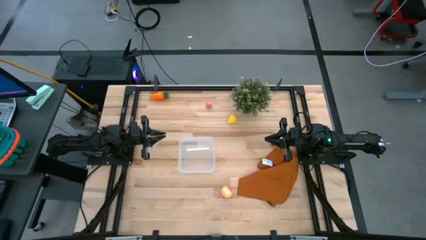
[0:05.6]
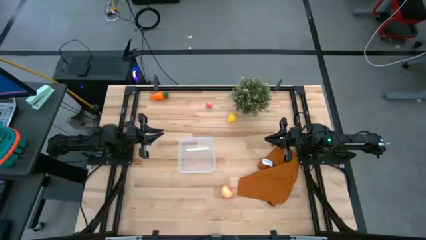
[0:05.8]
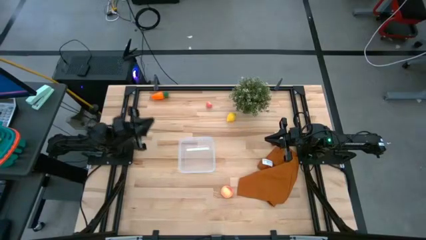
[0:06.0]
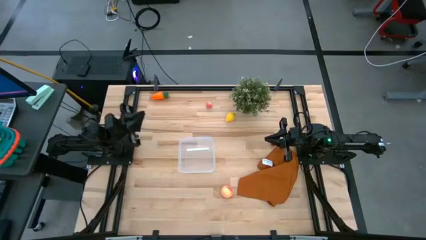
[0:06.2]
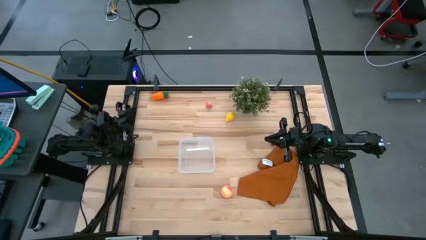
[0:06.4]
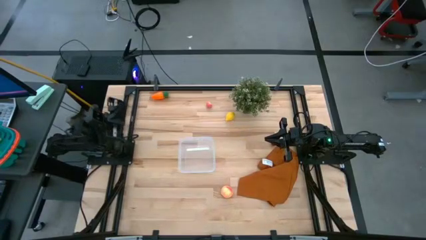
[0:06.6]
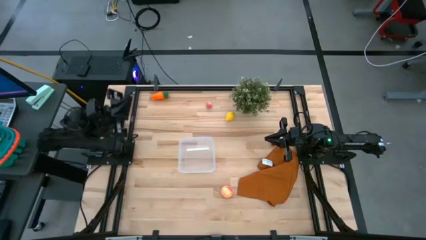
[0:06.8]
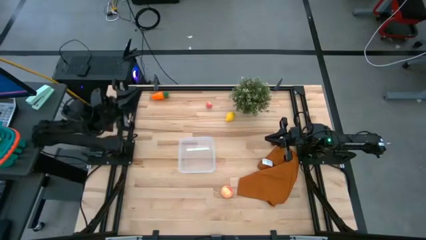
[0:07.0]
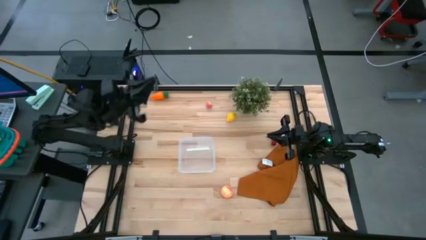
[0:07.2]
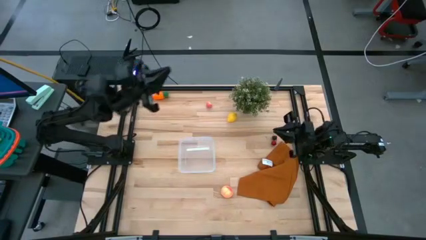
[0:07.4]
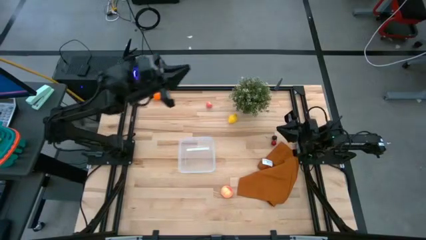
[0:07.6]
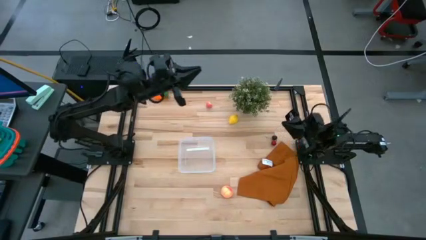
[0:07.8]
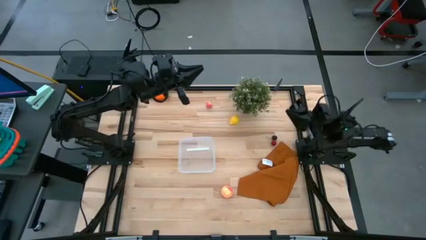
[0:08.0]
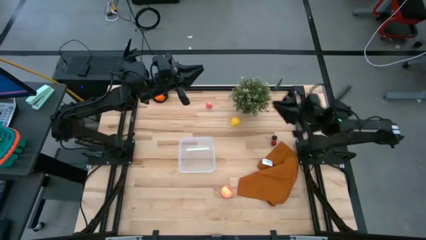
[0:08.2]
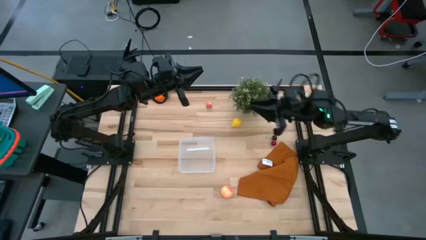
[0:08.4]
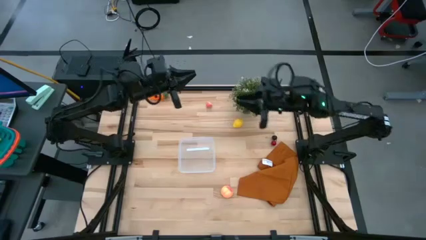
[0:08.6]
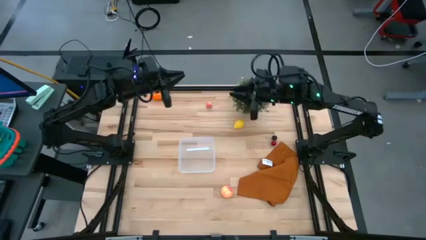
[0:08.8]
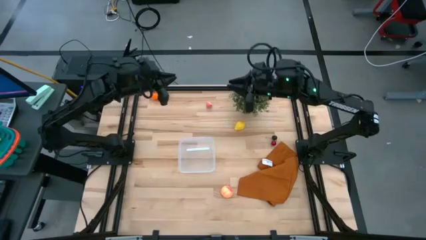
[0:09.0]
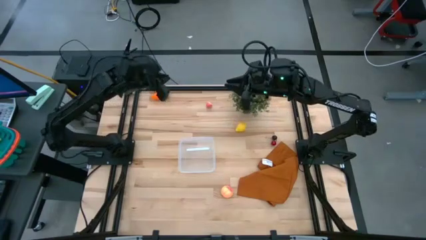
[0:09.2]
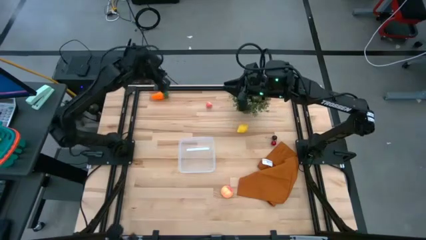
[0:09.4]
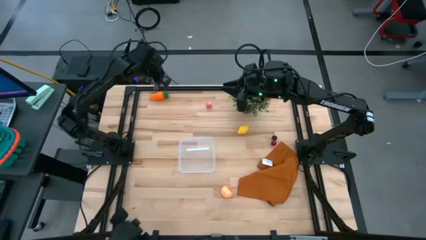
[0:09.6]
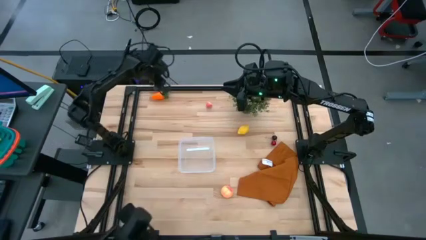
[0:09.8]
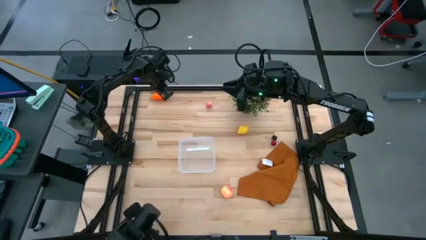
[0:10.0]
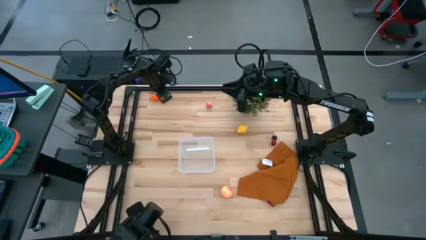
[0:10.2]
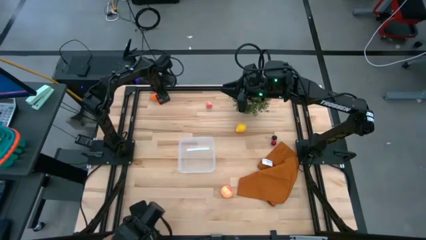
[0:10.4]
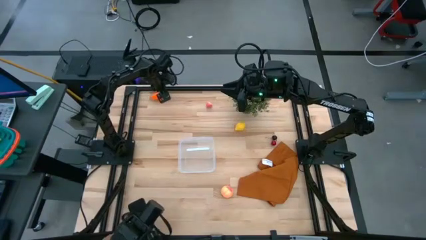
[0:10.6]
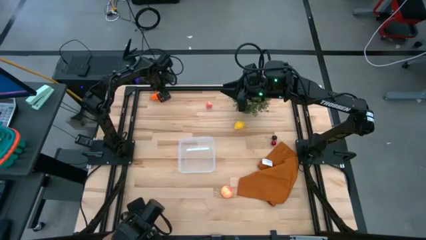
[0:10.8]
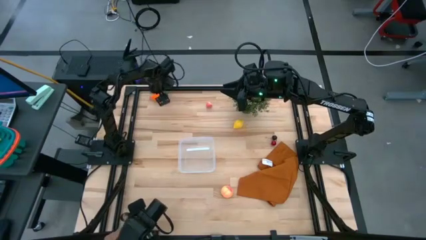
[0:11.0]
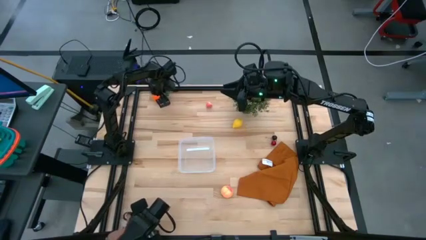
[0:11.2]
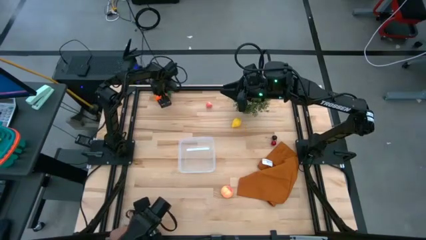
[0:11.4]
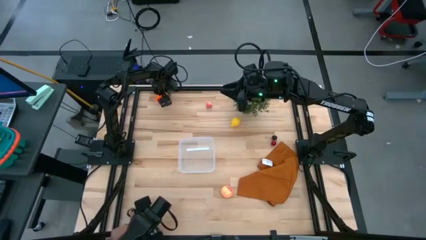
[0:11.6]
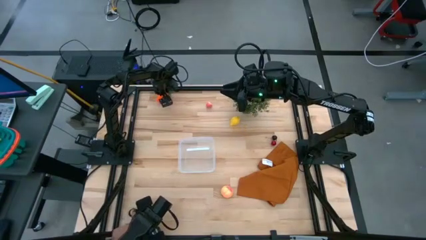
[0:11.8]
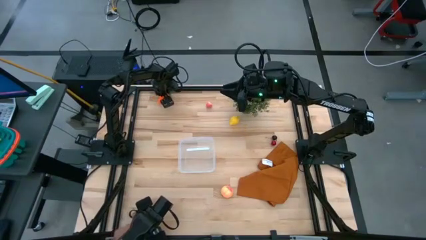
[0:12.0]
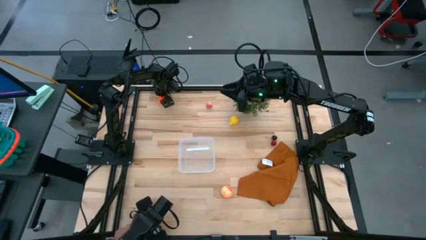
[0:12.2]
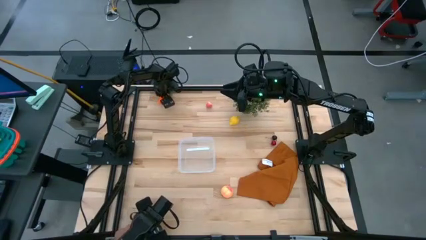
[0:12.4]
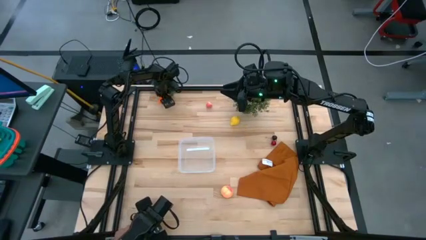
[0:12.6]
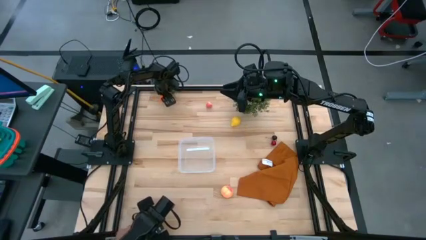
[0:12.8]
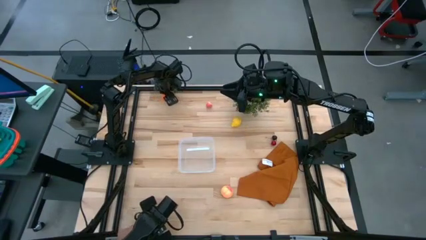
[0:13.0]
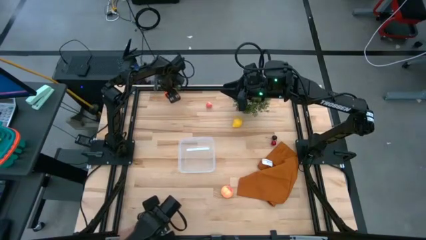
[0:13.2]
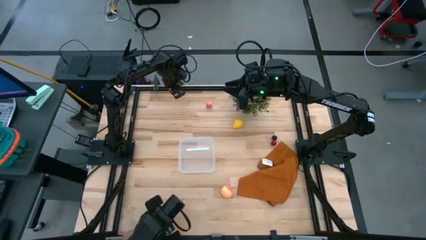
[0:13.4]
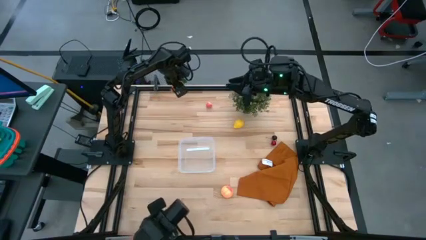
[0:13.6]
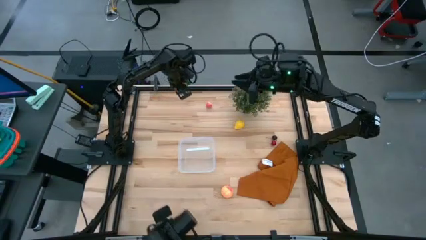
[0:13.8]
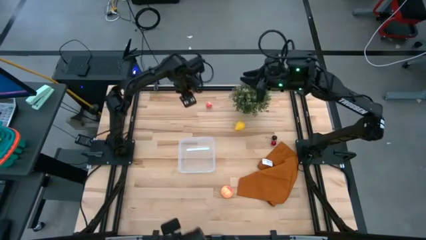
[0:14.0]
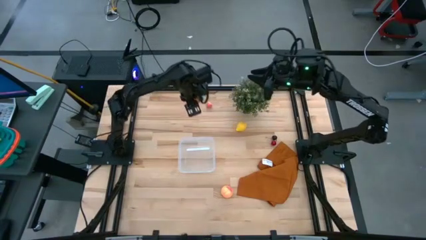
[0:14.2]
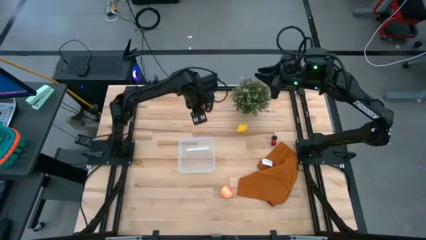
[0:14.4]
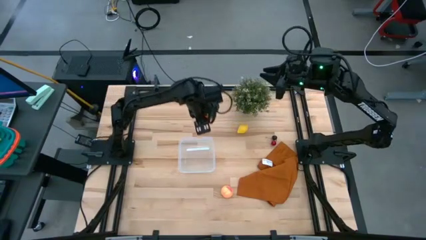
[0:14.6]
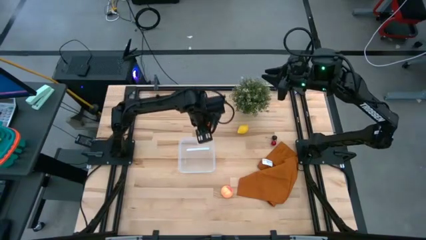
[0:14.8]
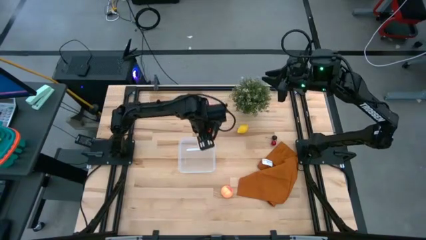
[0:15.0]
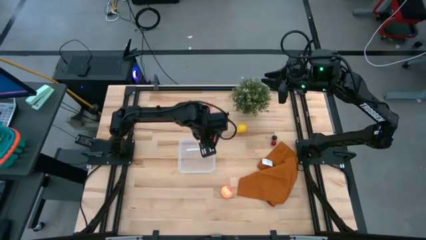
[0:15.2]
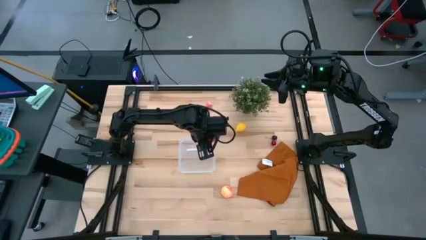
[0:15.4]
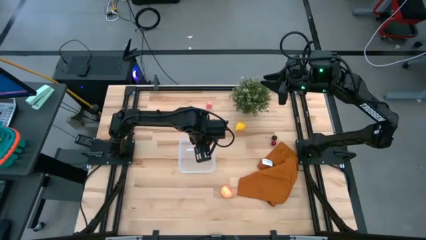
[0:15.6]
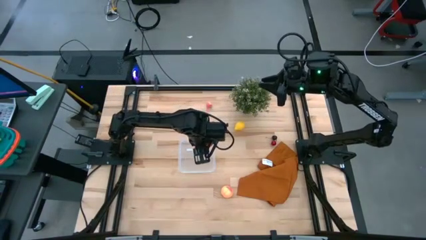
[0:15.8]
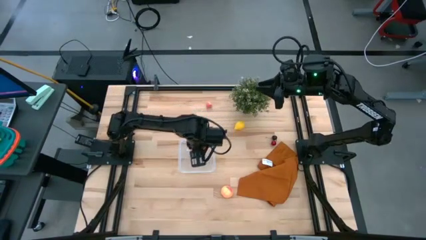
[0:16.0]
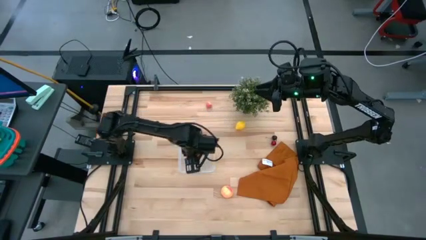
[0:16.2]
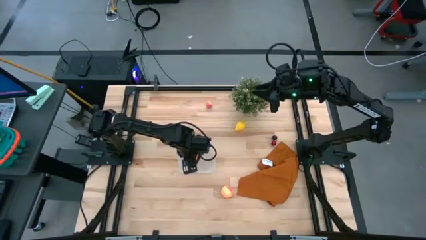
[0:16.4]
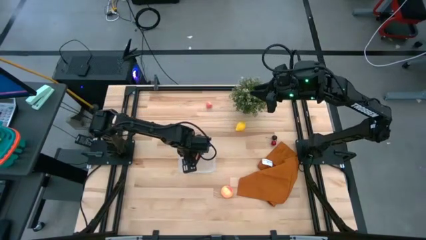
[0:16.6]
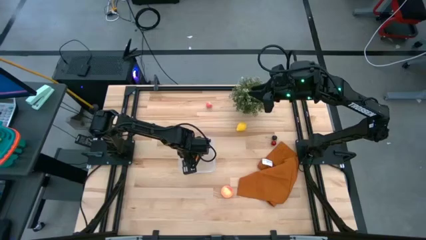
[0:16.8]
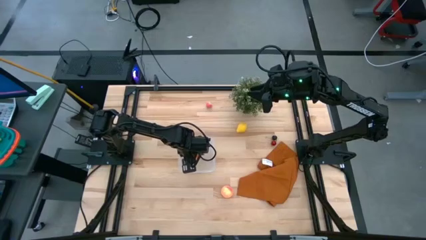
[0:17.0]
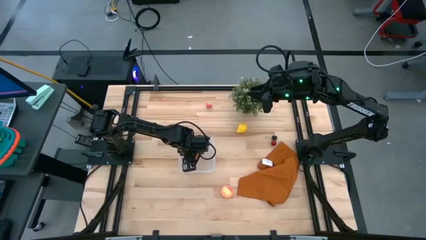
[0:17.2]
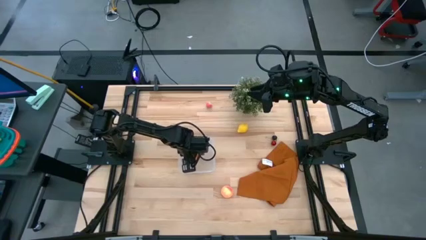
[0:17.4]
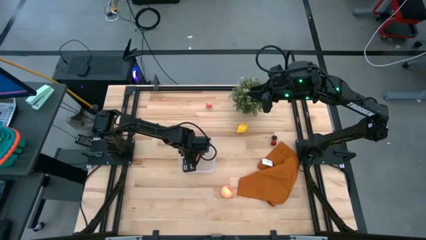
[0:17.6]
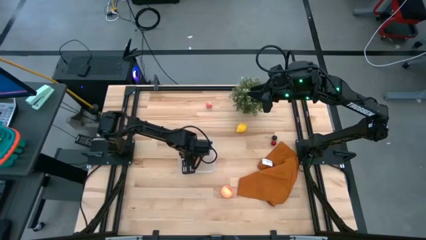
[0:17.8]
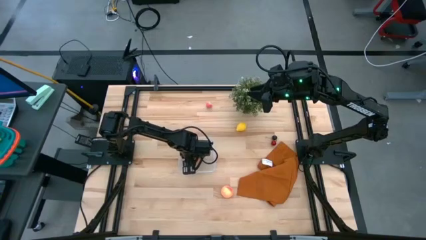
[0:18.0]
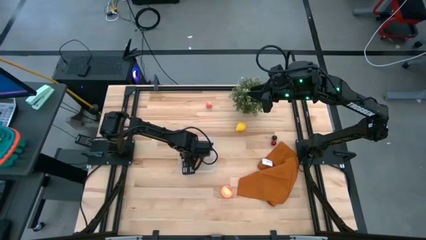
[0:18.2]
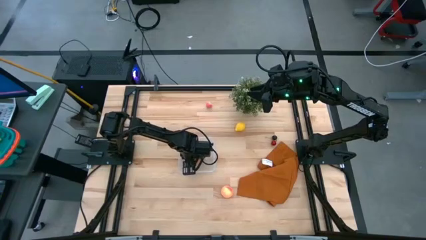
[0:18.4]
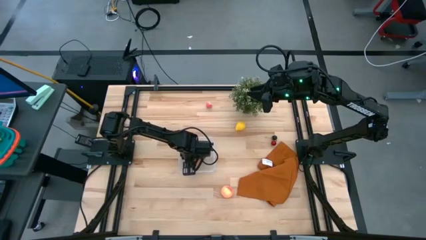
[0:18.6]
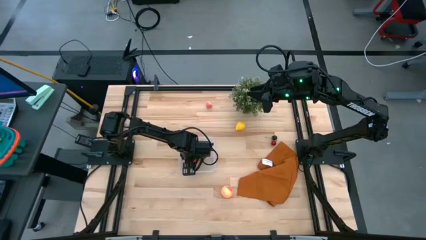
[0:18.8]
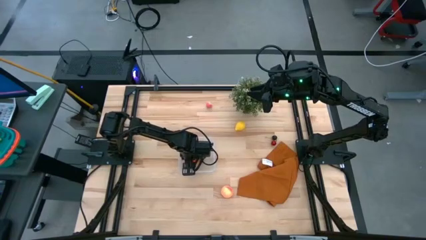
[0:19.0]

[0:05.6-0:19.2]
Task: Pick and placing Produce into tupperware
Put the orange carrot into the transparent bin
